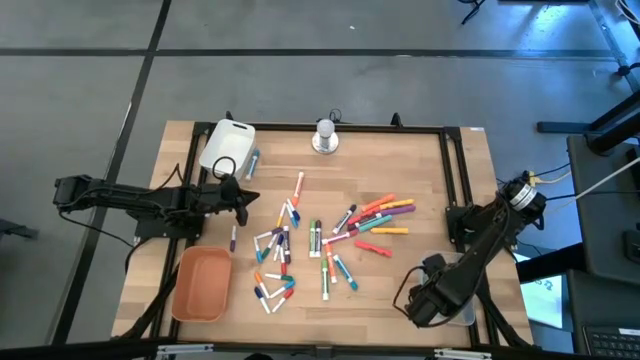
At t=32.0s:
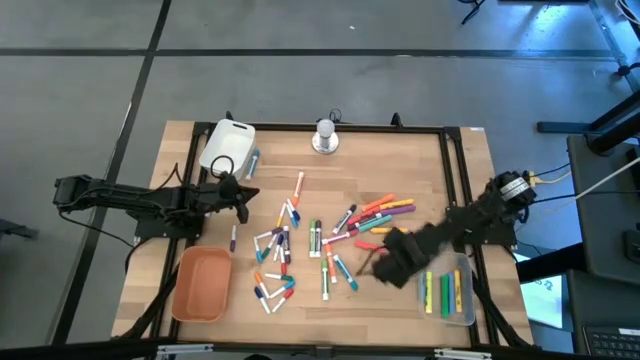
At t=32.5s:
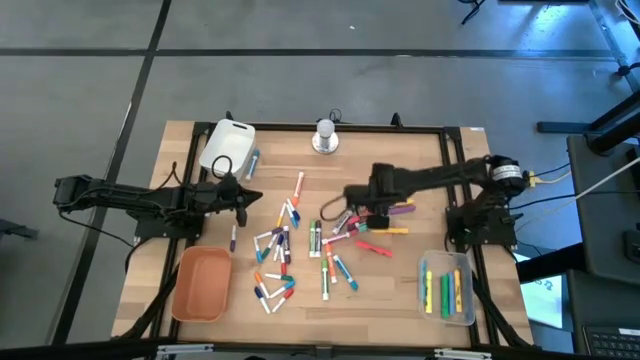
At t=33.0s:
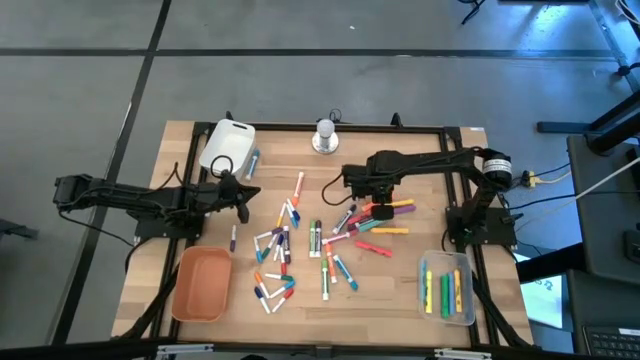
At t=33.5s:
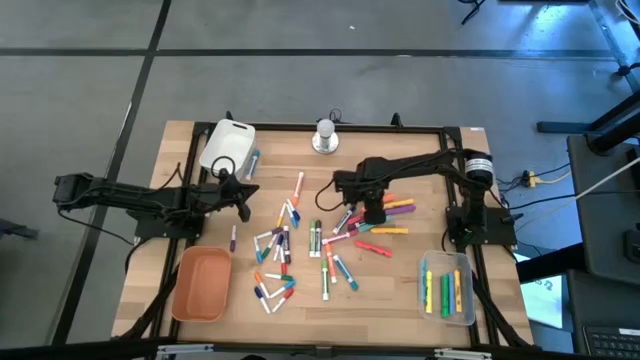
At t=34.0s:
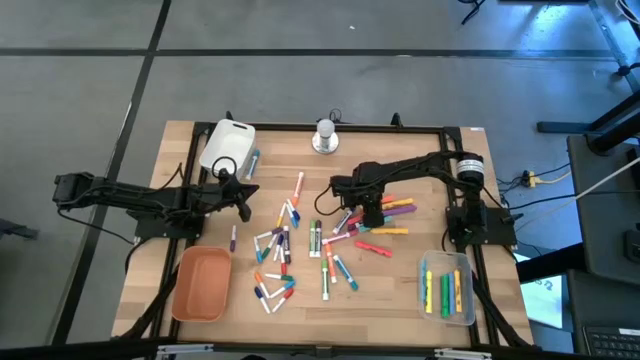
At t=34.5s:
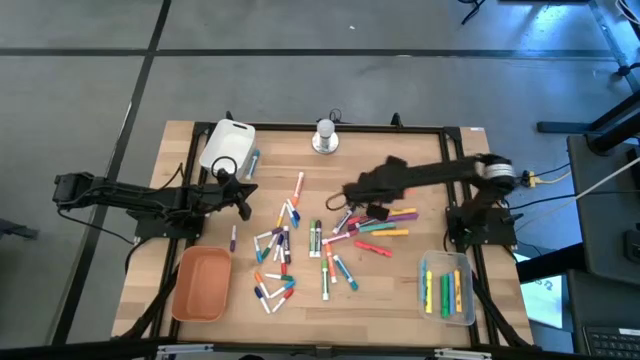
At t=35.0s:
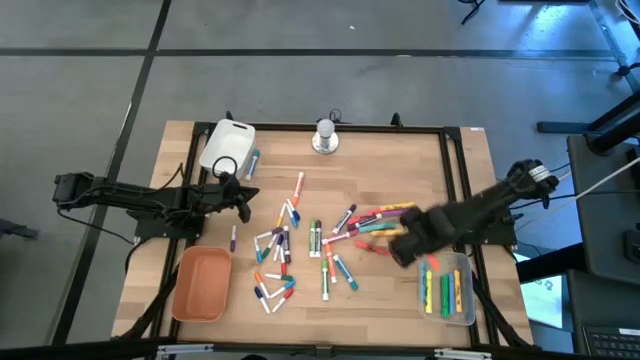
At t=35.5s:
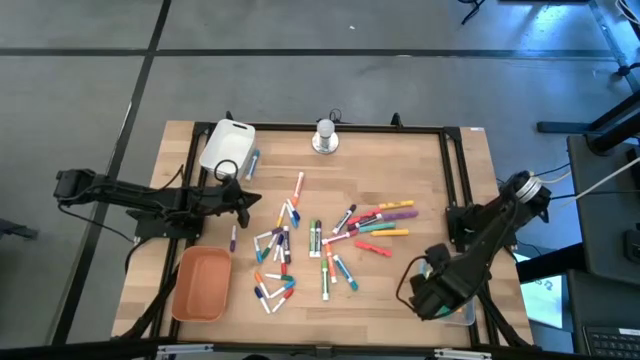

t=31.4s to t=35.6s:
Task: Pick & Place Markers
Put the orange highlighter pen into the transparent bin

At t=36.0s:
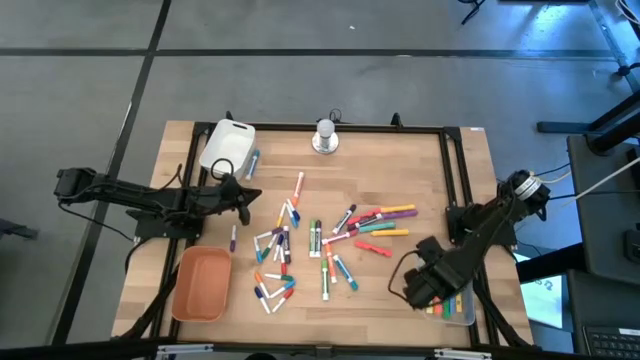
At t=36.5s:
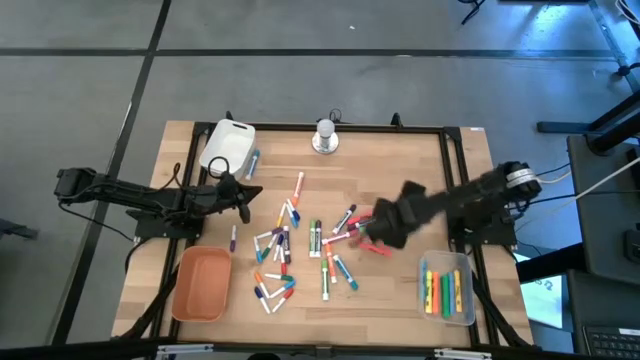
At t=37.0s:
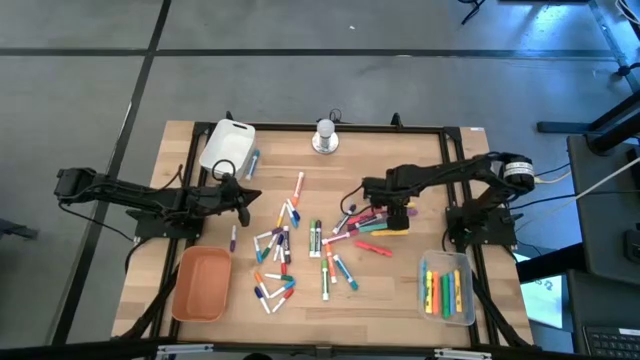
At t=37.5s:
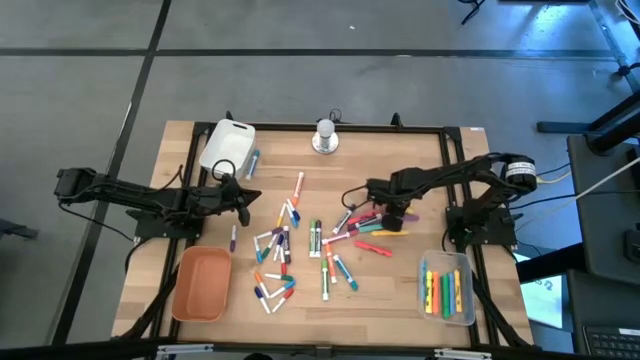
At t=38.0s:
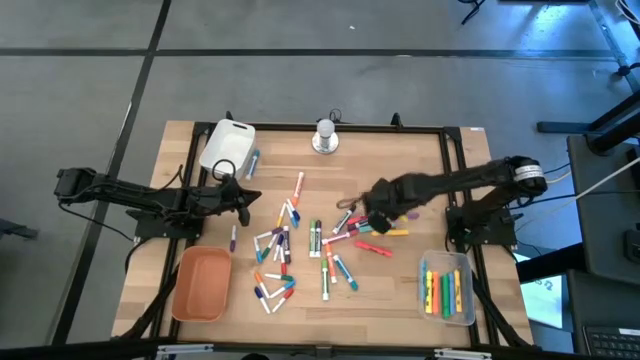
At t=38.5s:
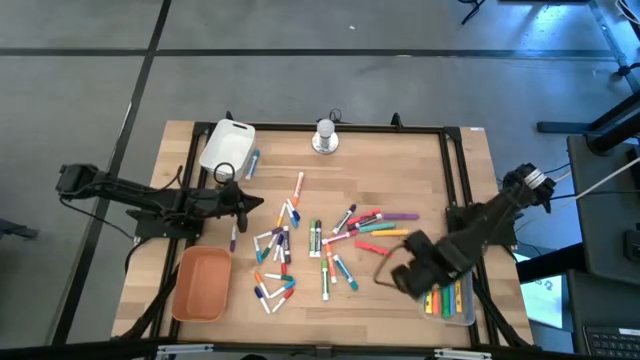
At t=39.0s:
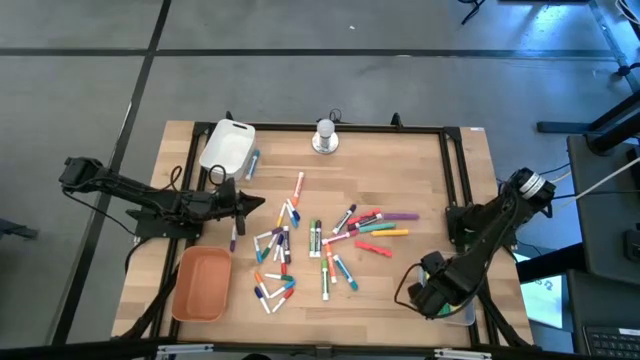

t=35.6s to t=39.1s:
Put the yellow highlighter pen into the transparent bin

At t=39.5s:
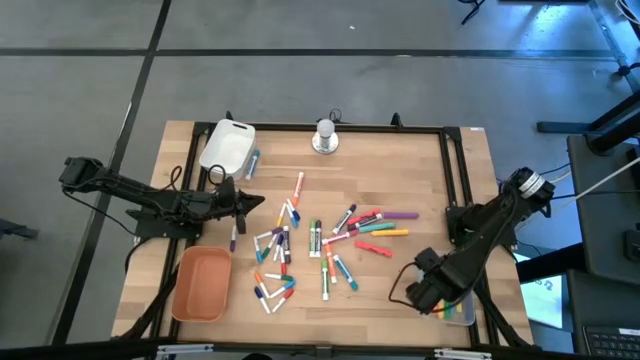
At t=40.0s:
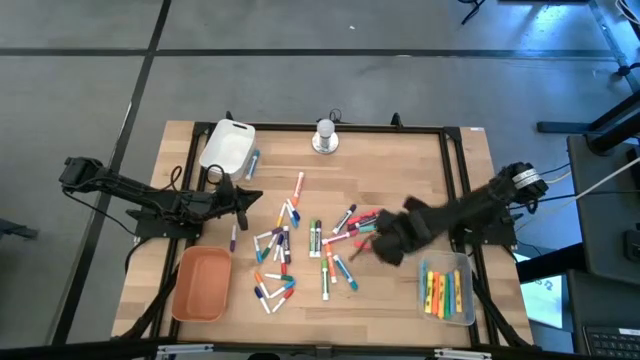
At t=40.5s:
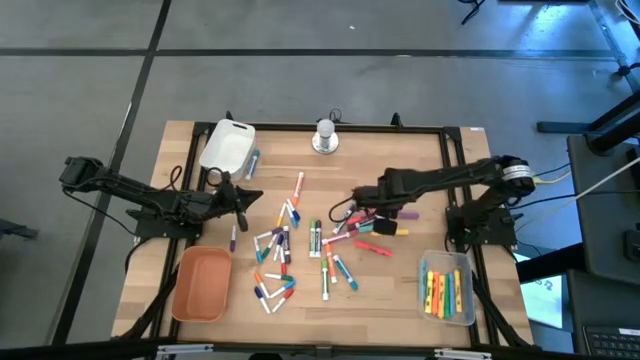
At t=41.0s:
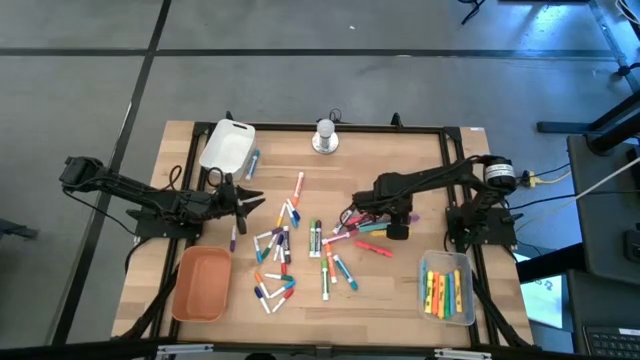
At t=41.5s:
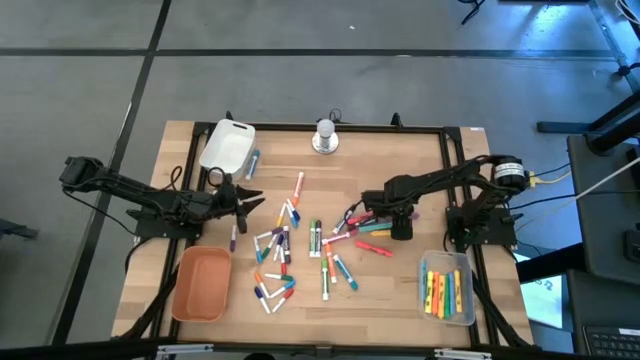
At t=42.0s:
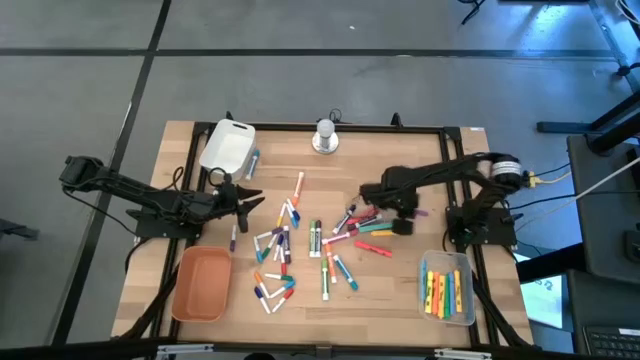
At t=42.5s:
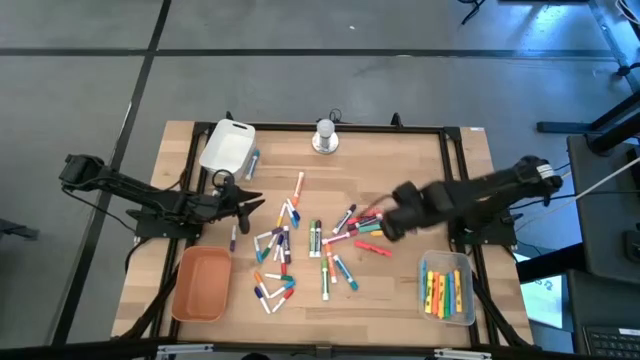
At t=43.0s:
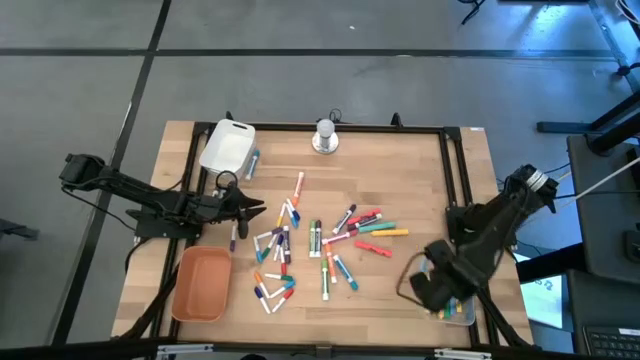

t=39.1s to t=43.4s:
Put the violet highlighter pen into the transparent bin

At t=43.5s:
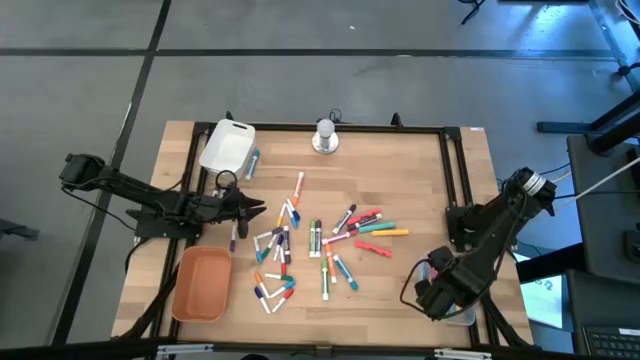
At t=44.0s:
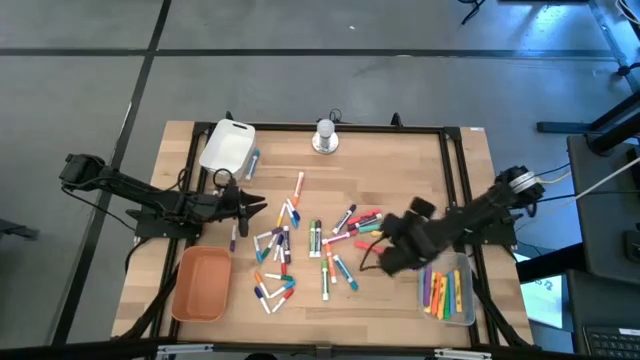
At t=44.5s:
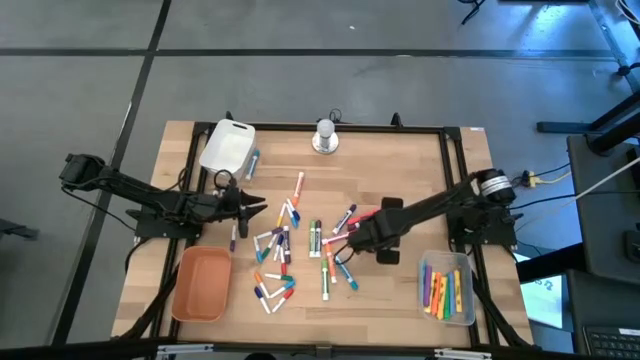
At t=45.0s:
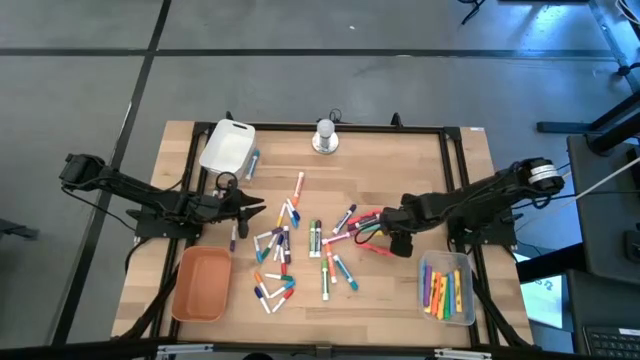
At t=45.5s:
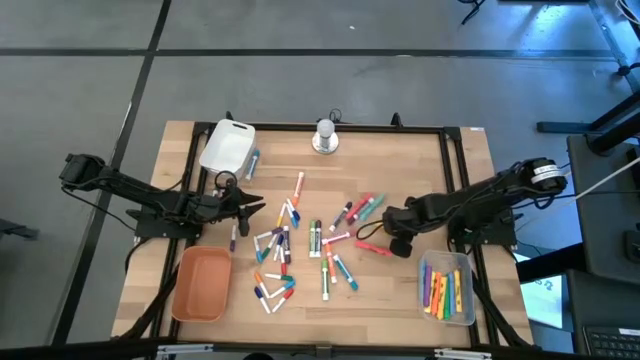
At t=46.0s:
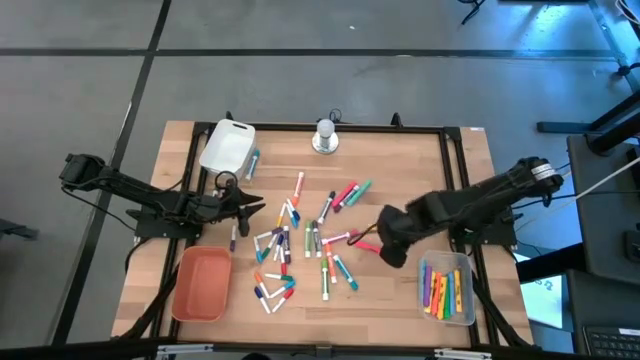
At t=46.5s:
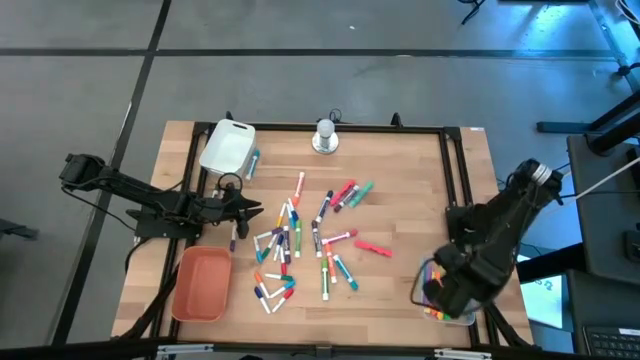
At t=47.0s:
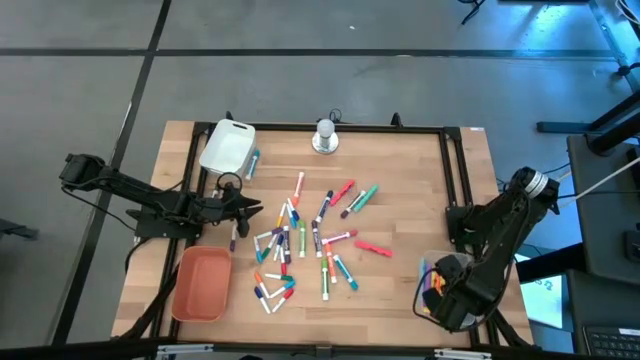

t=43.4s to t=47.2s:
Put the yellow highlighter pen into the transparent bin

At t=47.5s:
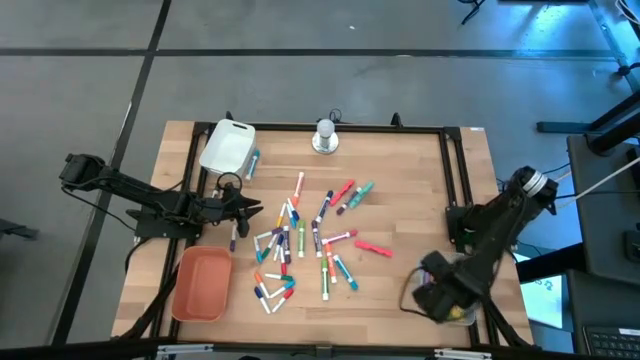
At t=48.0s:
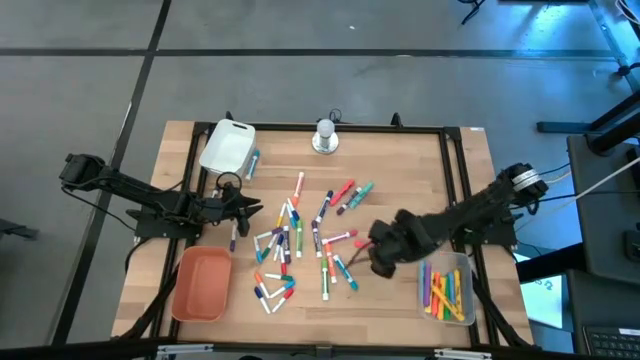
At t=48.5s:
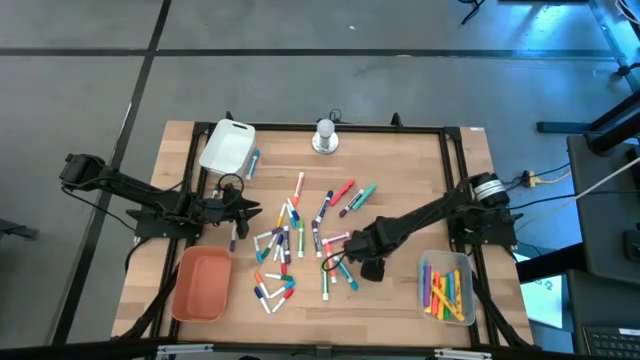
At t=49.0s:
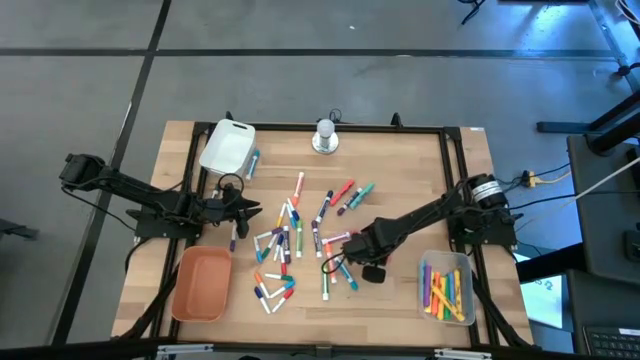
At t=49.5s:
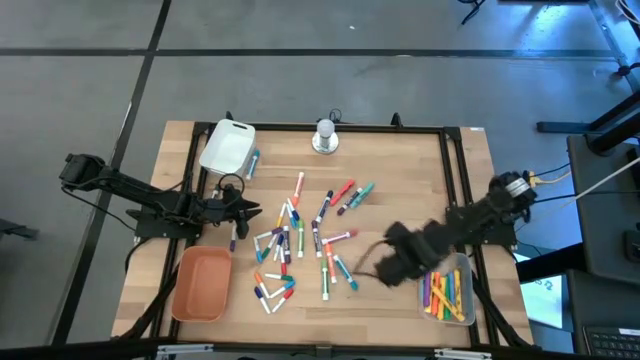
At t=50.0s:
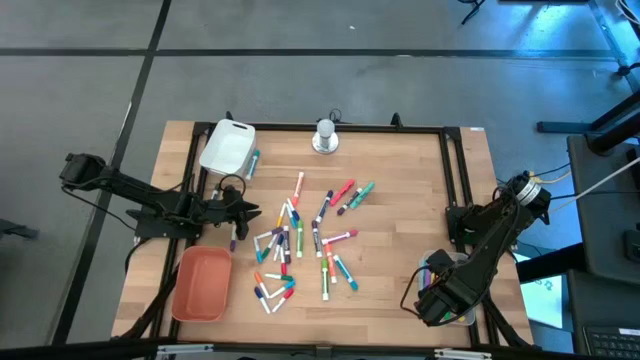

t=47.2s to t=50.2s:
Put the pink highlighter pen into the transparent bin

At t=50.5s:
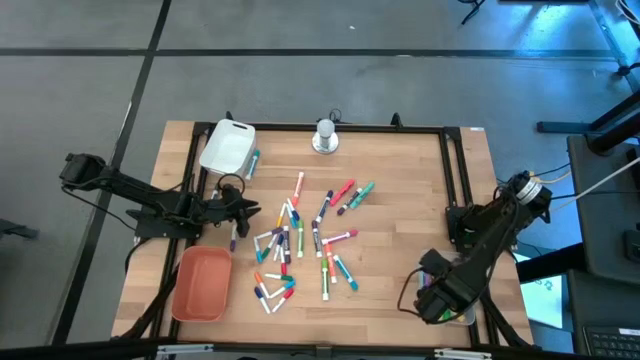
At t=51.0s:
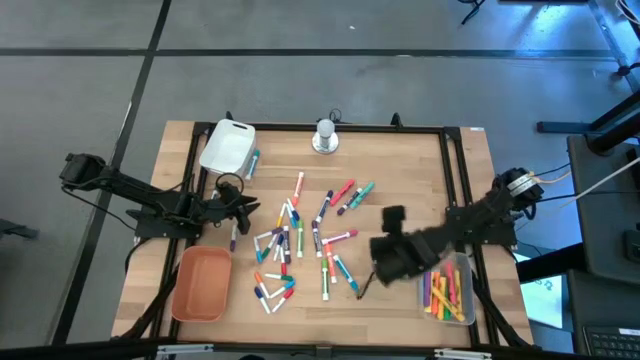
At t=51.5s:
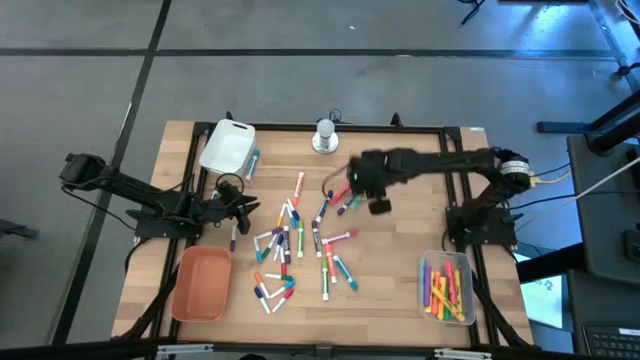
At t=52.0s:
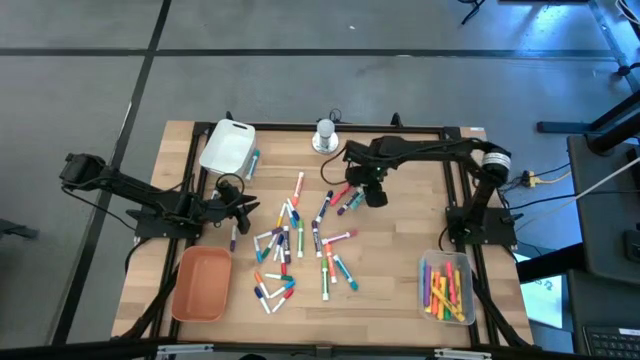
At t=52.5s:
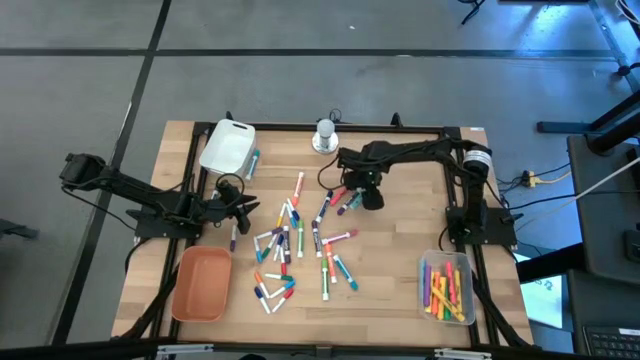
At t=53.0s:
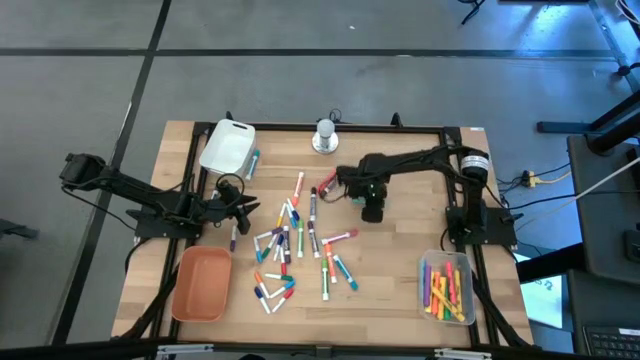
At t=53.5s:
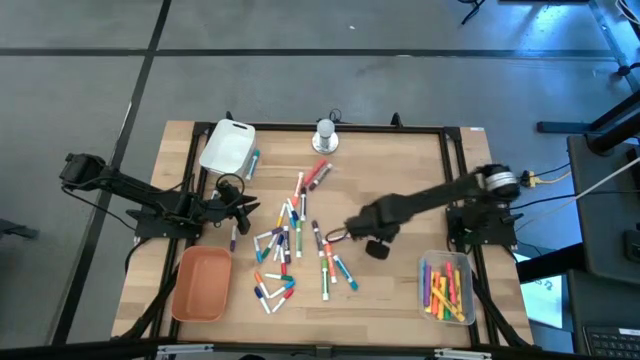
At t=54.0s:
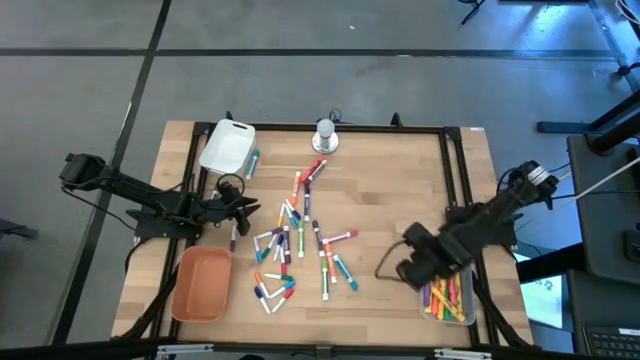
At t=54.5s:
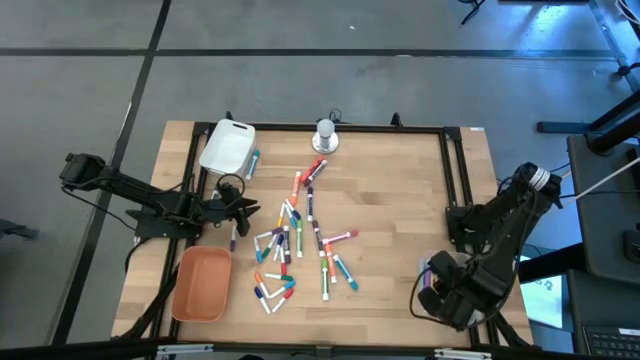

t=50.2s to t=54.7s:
Put the light blue highlighter pen into the transparent bin
